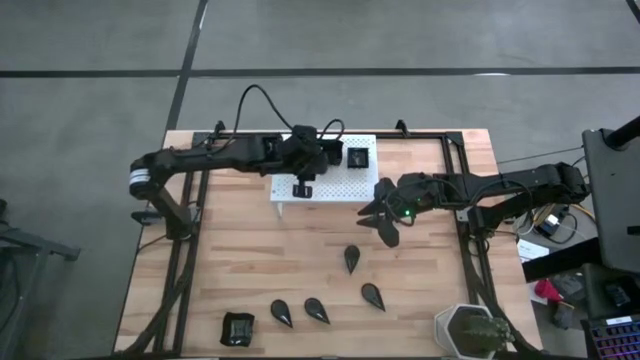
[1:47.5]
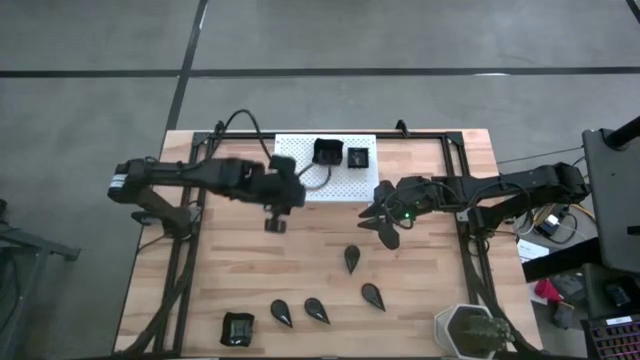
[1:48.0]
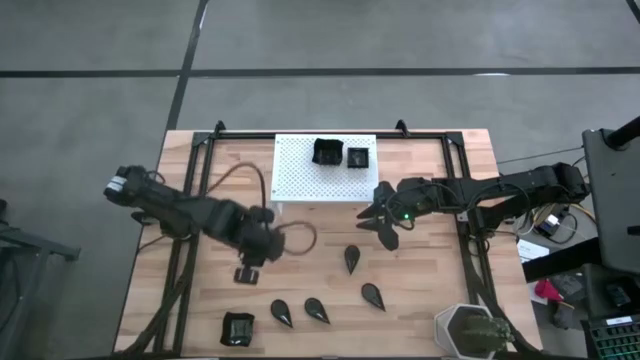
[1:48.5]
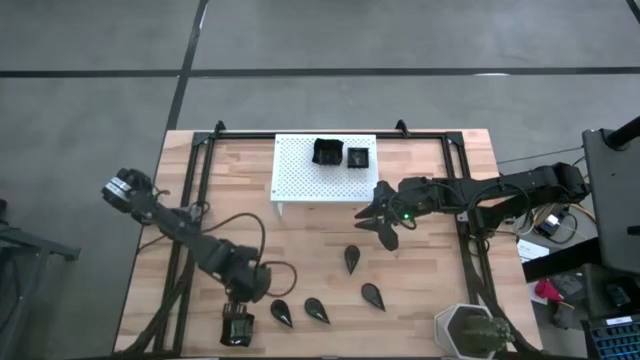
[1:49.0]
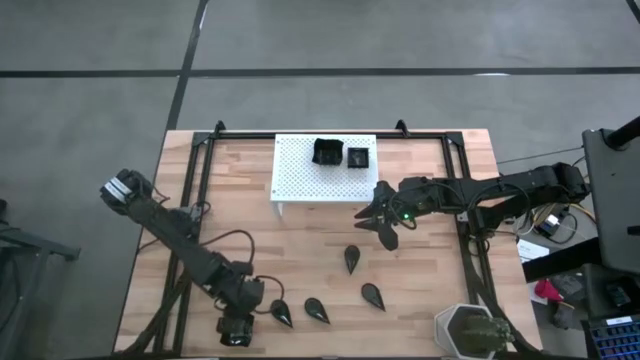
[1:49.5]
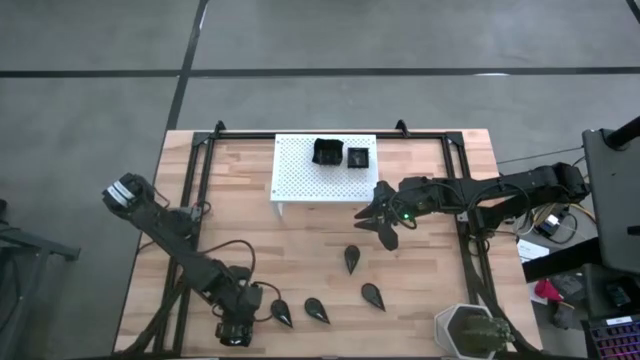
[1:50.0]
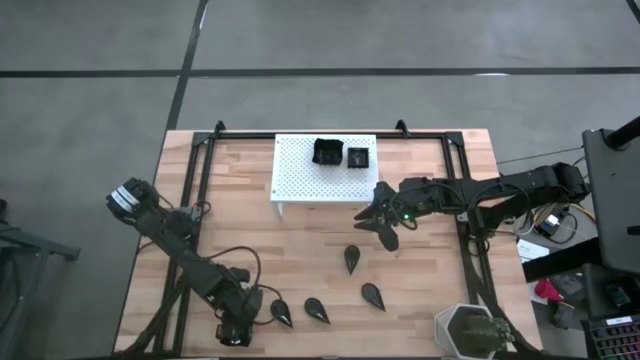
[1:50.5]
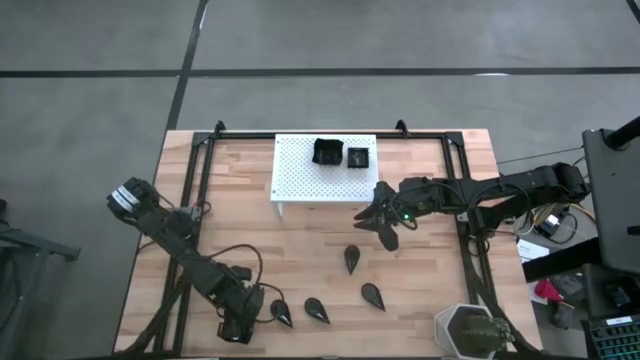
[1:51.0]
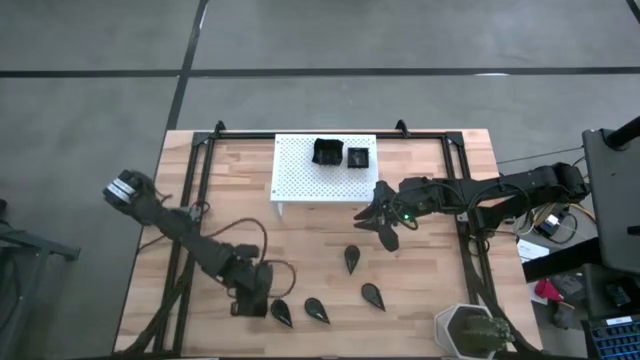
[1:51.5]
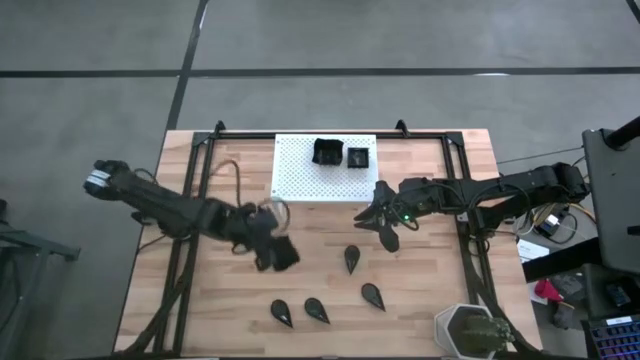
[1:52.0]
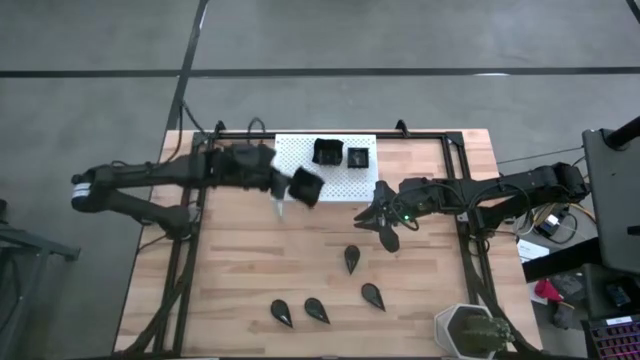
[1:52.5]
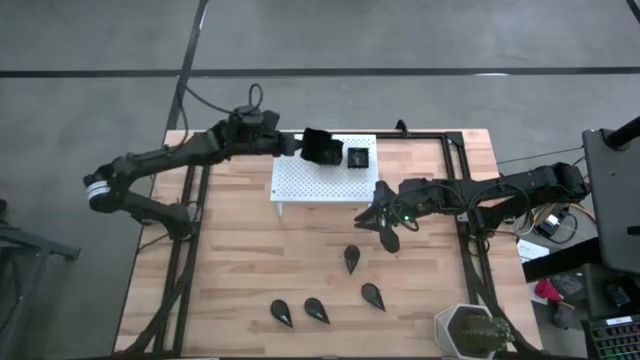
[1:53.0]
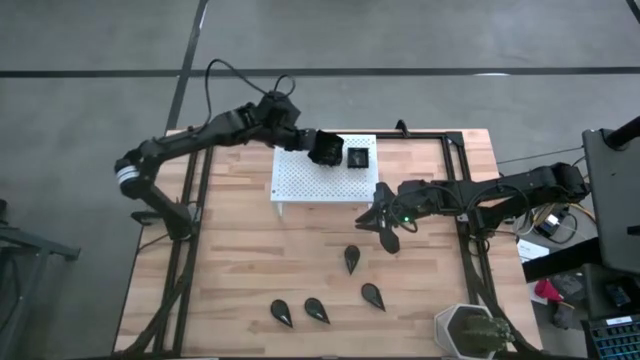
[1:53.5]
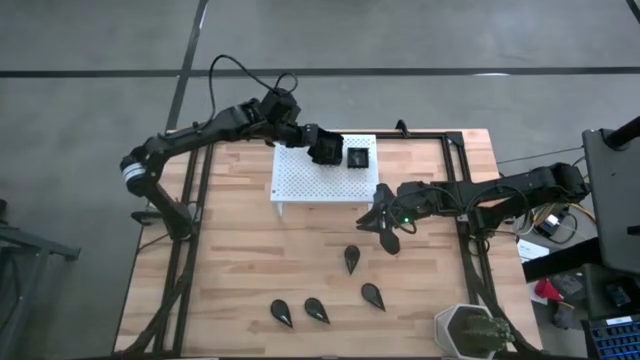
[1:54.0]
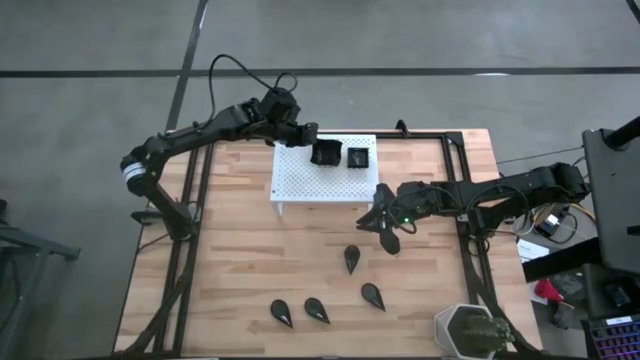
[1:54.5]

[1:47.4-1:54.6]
Task: Pick & Place Mini shaped plates
Stack the distorted square plate on top of the distorted square plate on the shelf

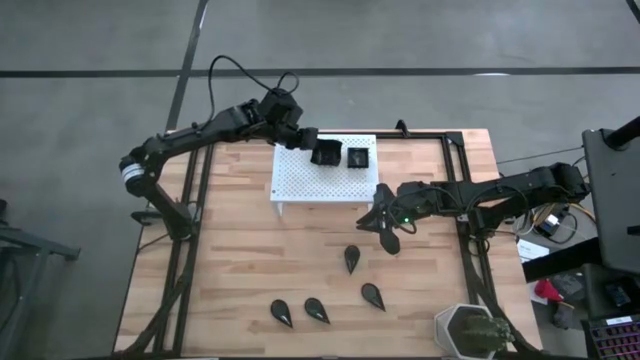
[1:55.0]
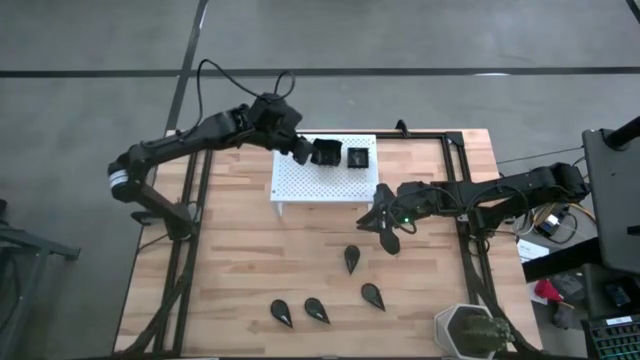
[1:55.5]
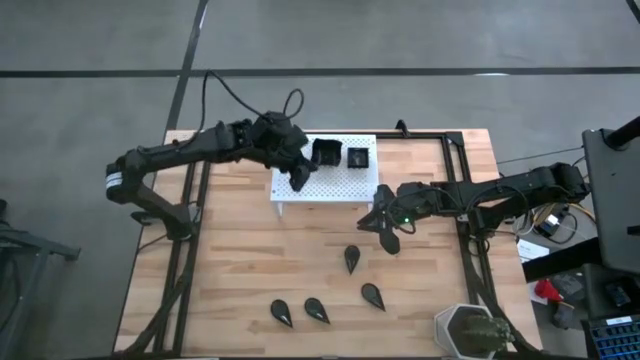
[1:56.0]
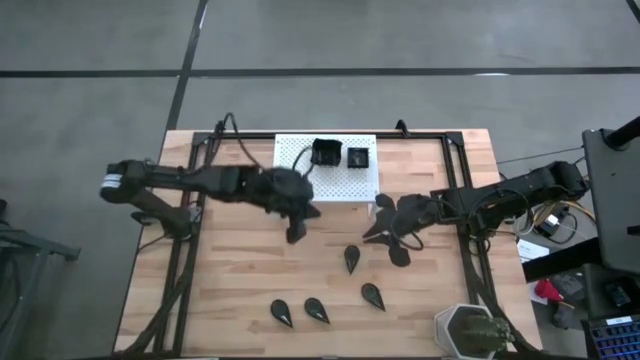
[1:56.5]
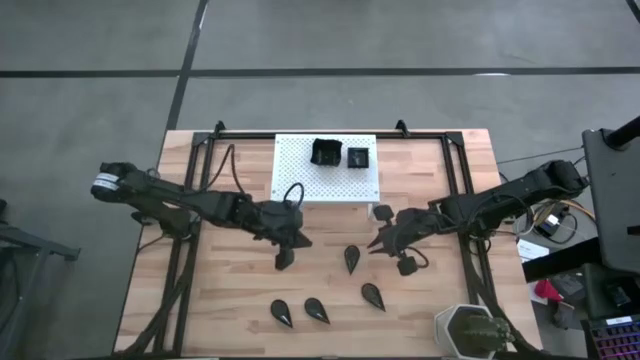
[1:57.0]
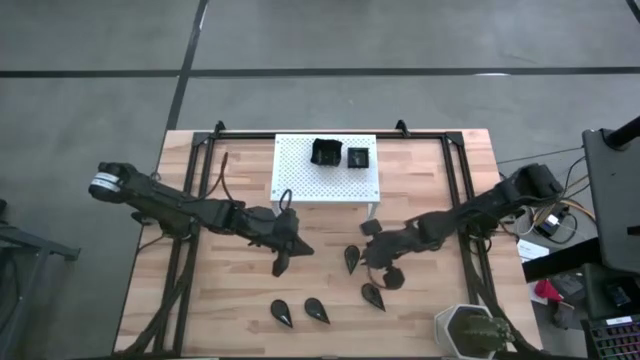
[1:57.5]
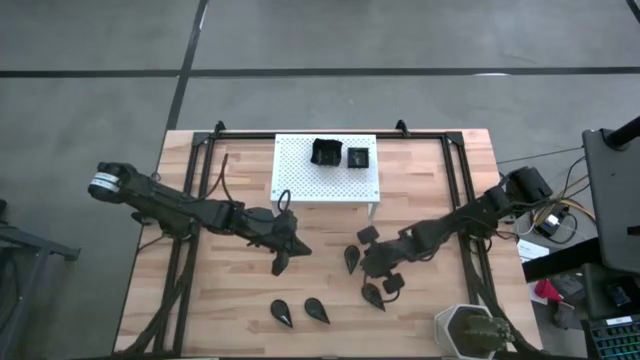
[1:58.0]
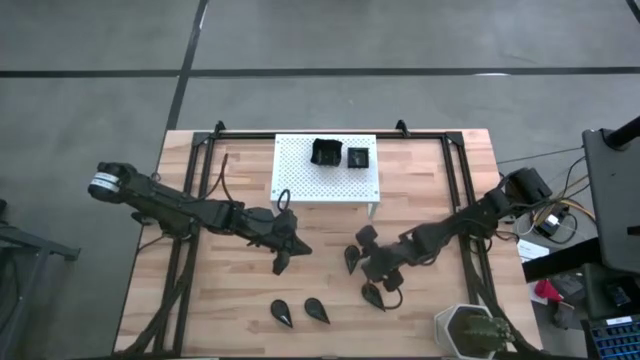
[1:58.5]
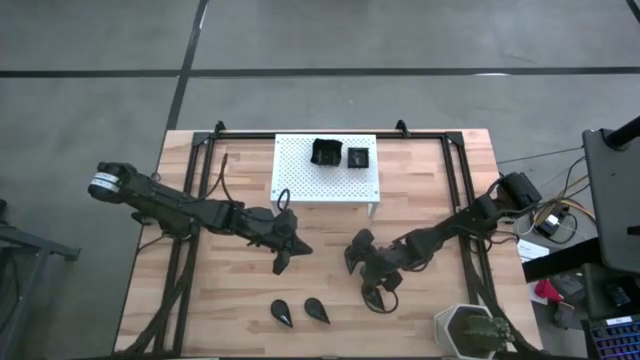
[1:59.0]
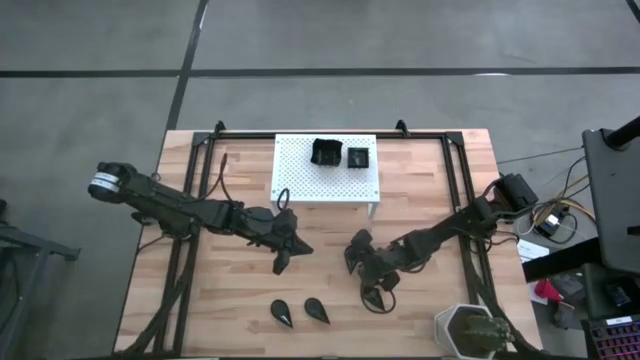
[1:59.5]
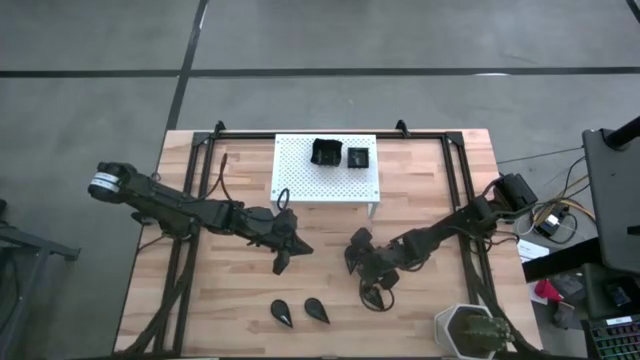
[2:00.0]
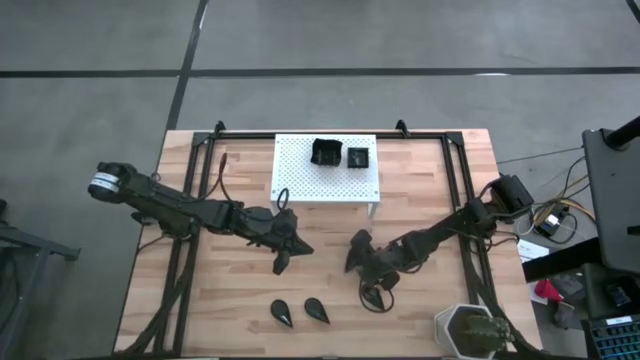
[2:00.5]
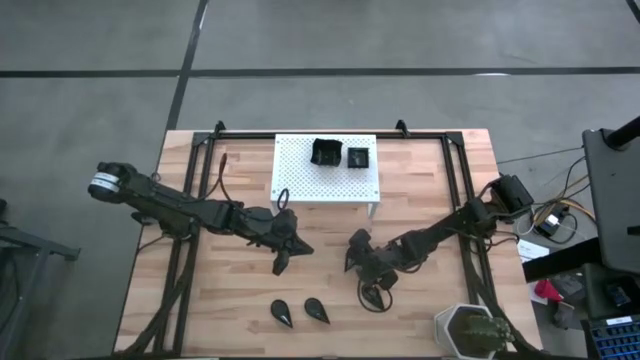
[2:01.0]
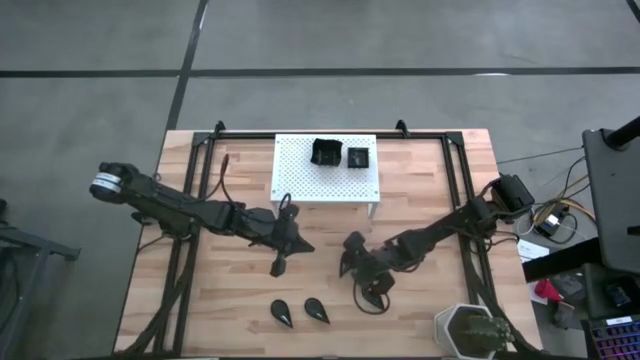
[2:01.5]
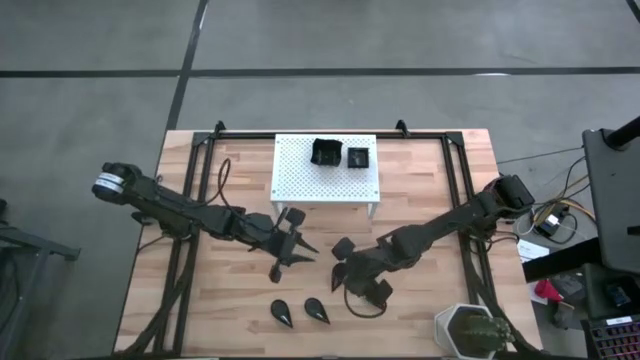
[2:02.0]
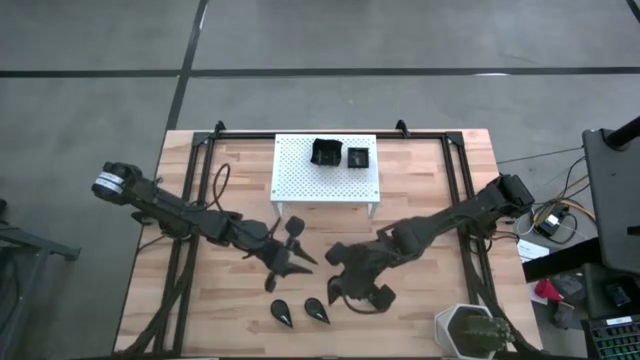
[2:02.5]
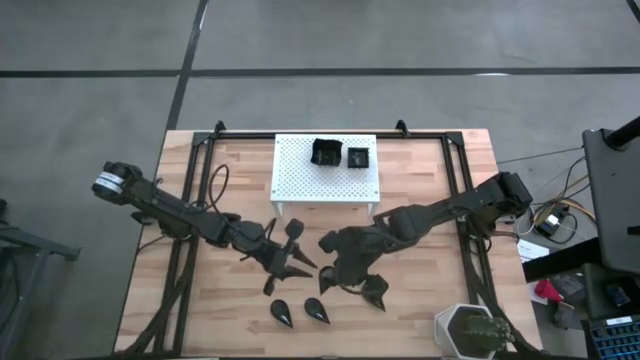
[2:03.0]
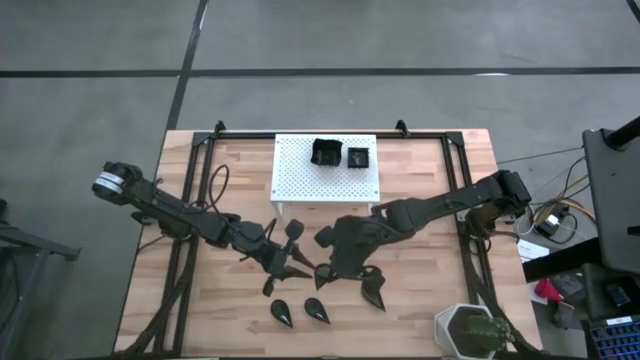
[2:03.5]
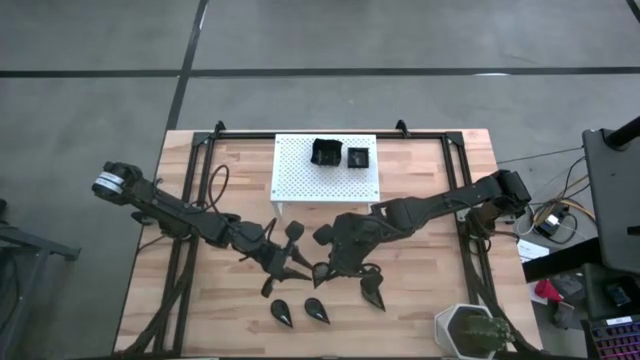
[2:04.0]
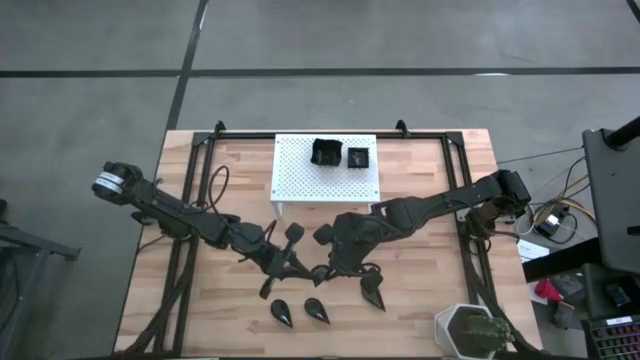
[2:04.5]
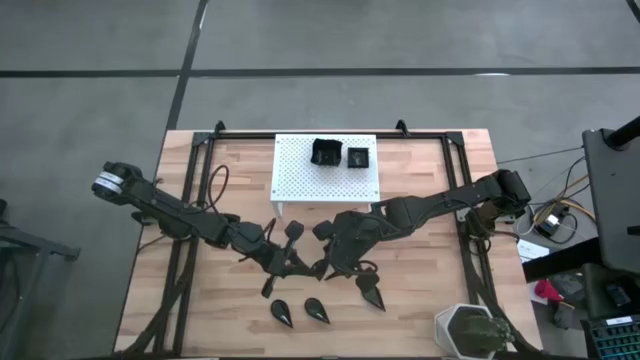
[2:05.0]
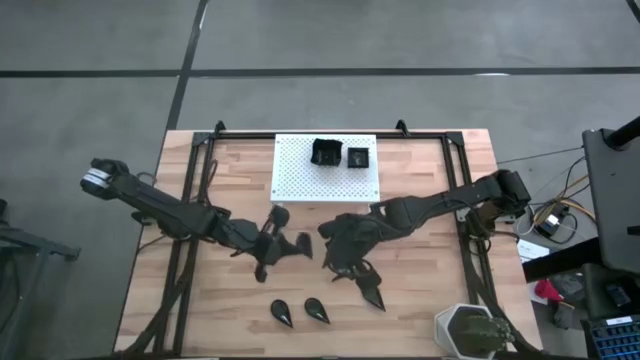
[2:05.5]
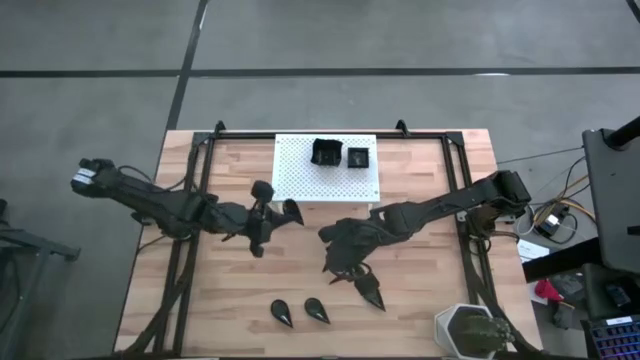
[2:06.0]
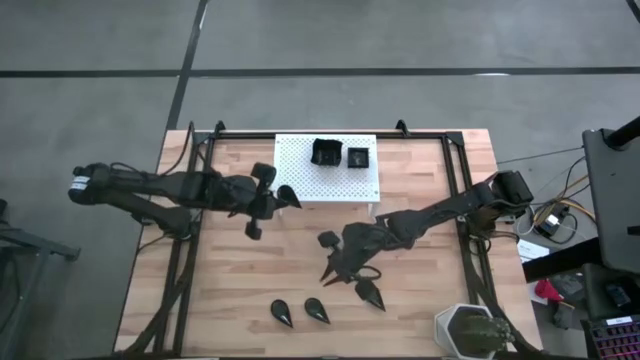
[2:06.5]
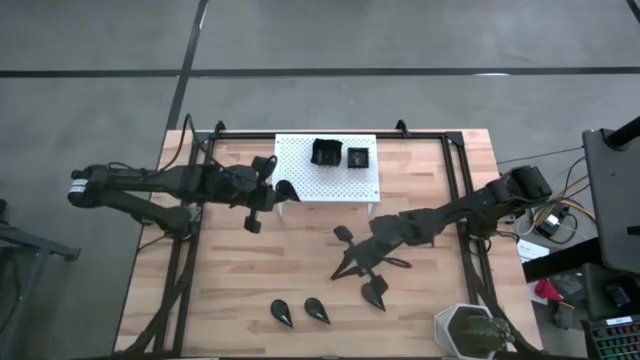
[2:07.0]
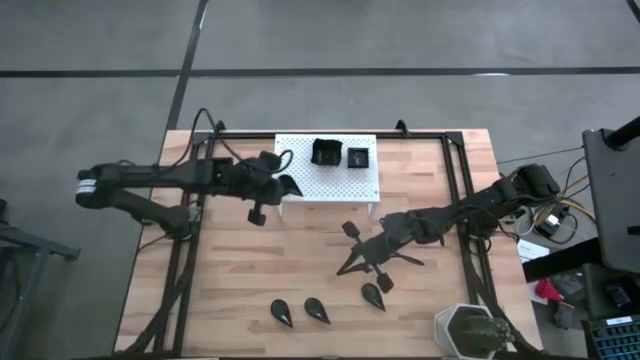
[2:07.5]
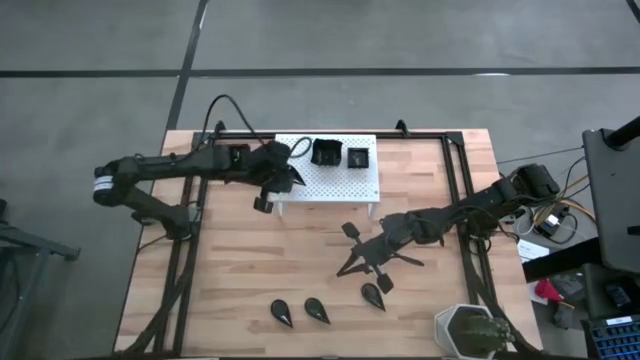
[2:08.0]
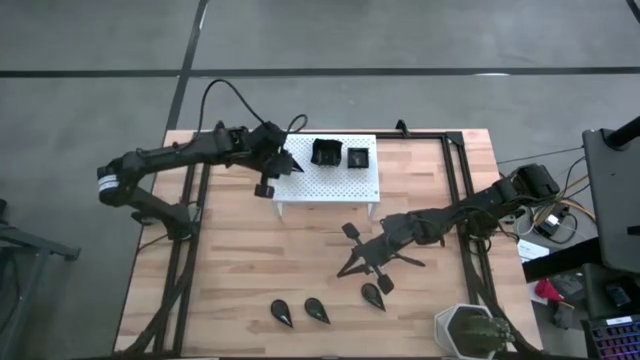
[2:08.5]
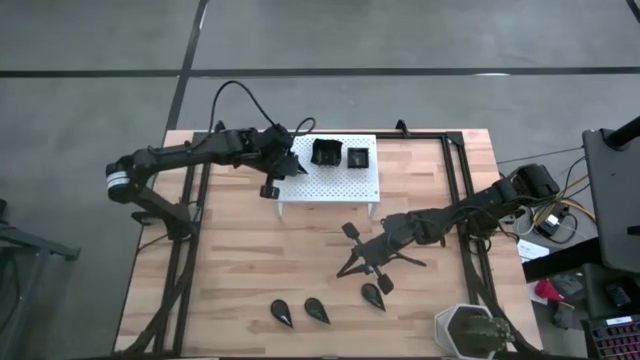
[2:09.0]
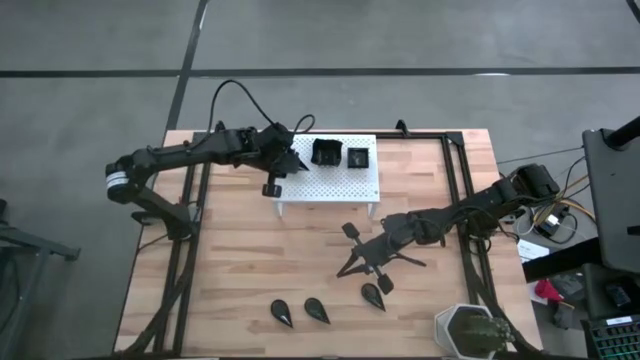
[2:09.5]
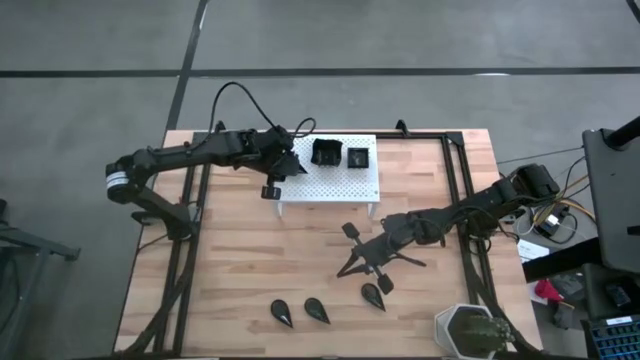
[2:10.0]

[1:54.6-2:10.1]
Put the drop shaped plate on the shelf
